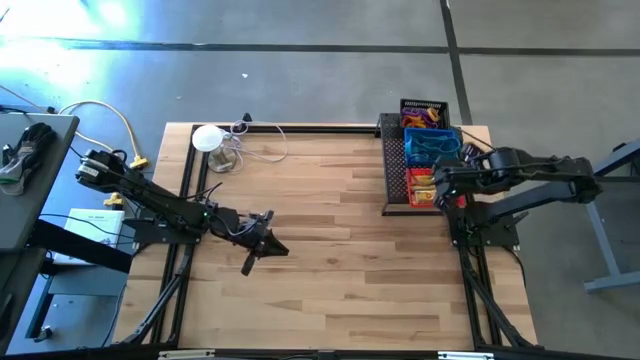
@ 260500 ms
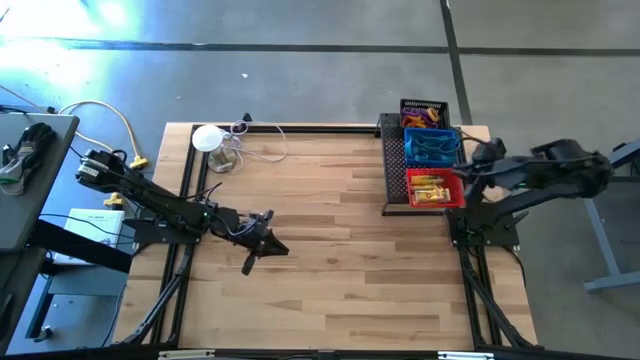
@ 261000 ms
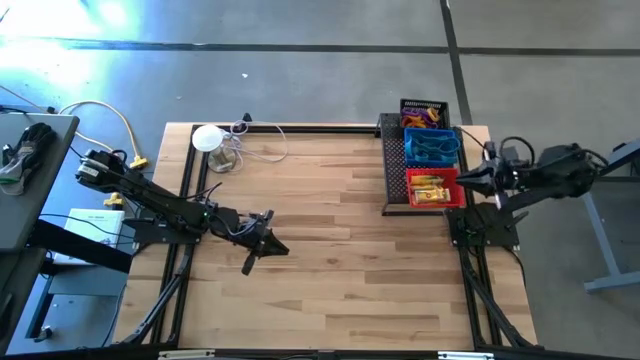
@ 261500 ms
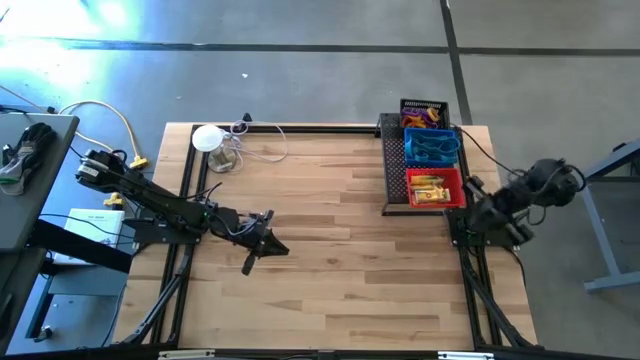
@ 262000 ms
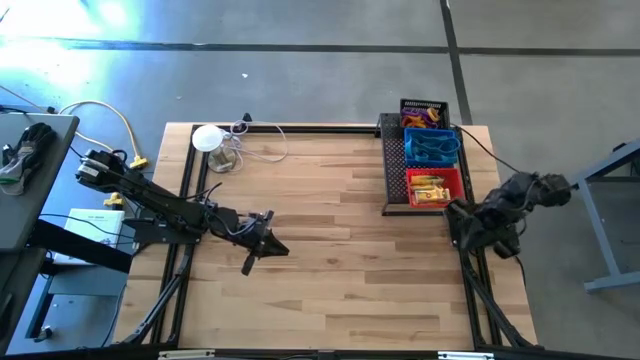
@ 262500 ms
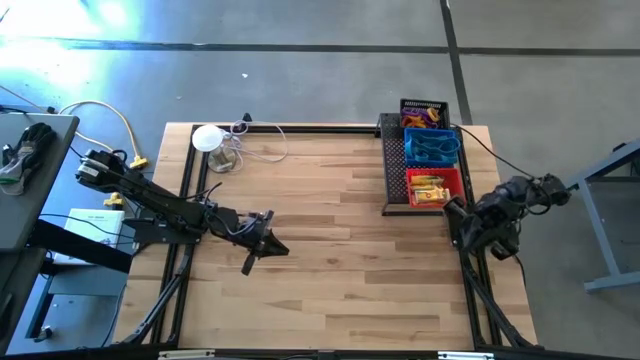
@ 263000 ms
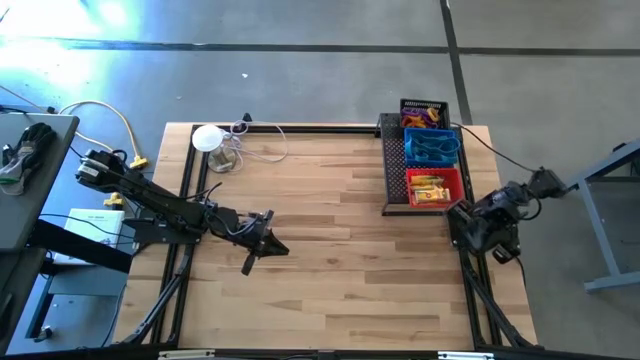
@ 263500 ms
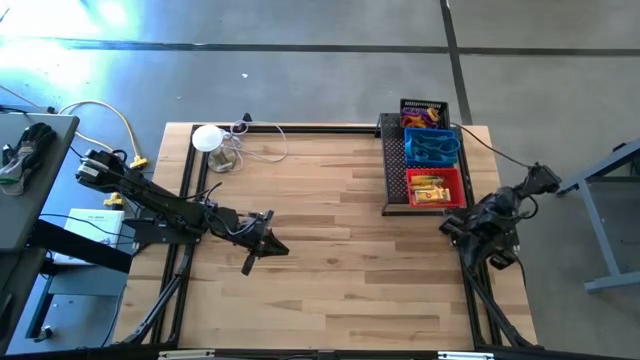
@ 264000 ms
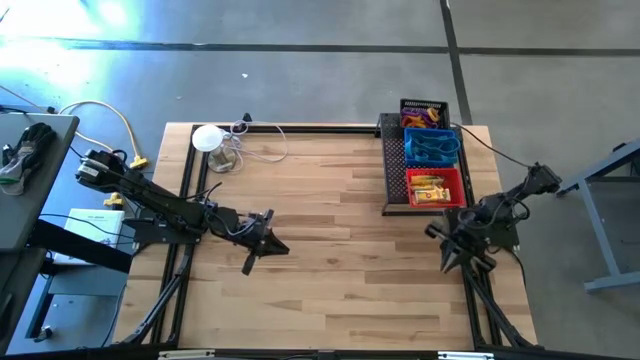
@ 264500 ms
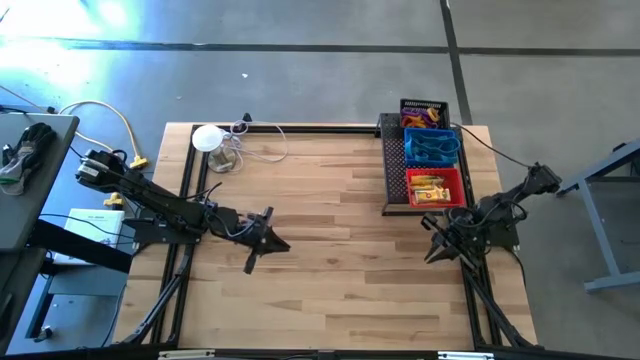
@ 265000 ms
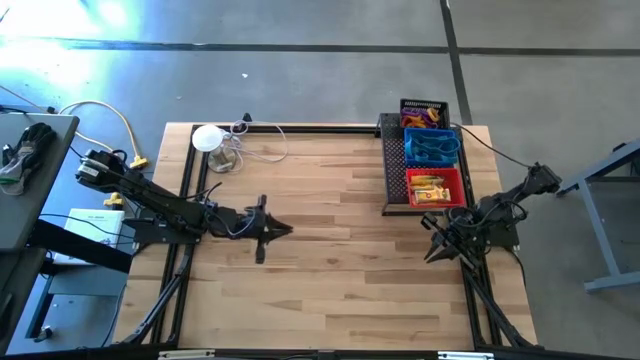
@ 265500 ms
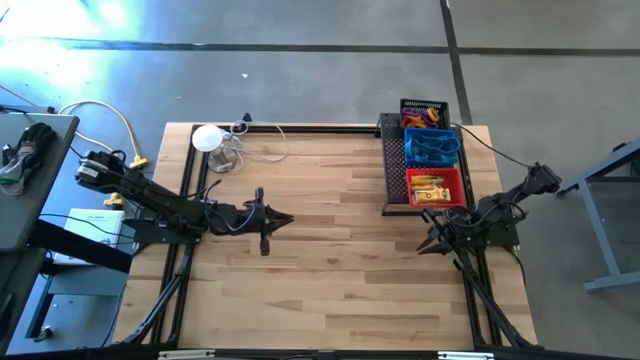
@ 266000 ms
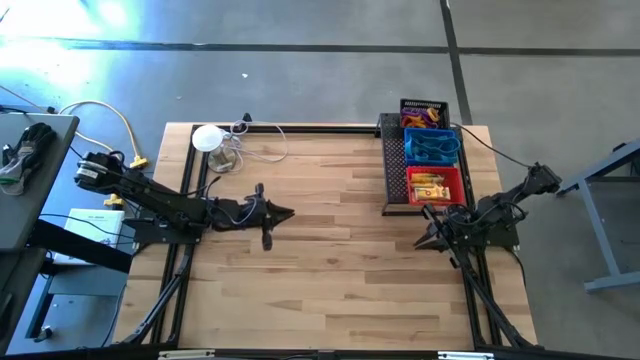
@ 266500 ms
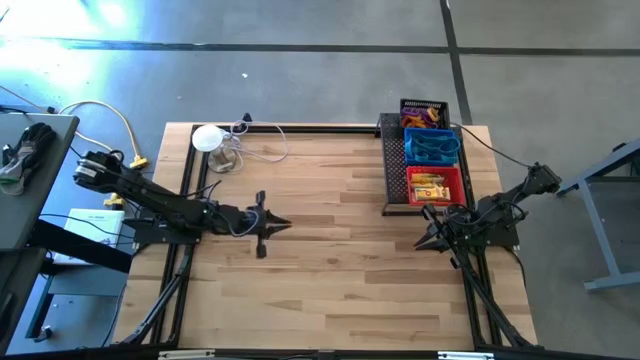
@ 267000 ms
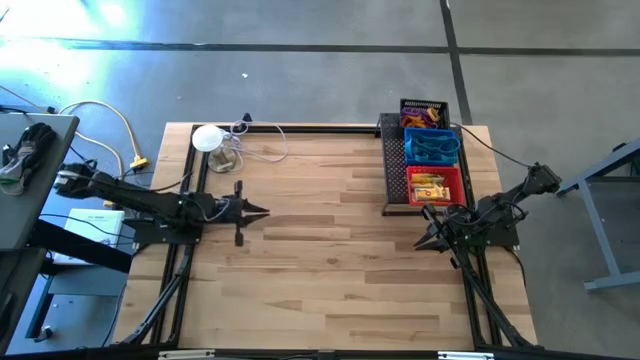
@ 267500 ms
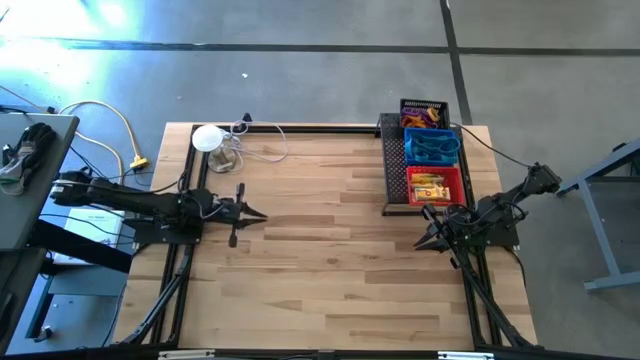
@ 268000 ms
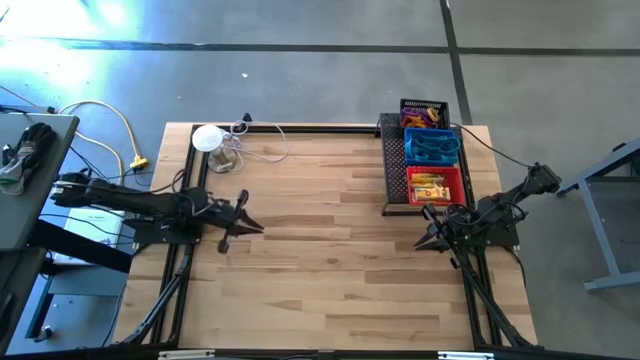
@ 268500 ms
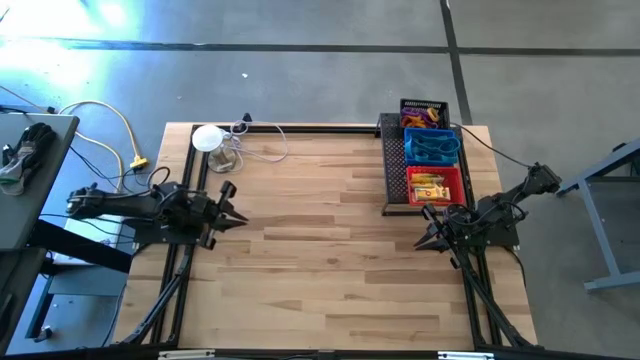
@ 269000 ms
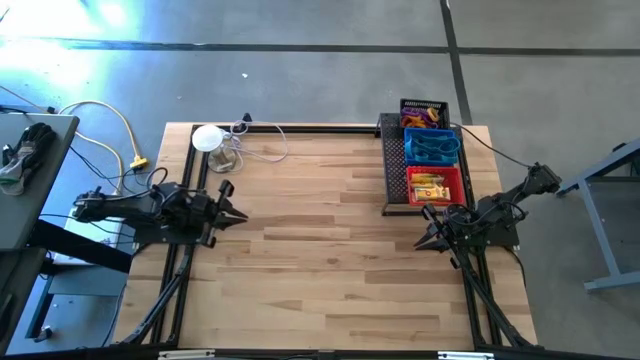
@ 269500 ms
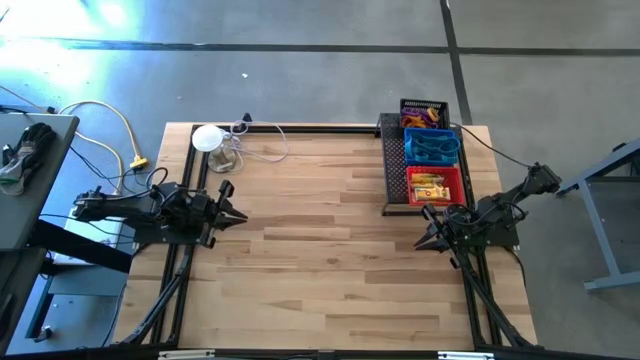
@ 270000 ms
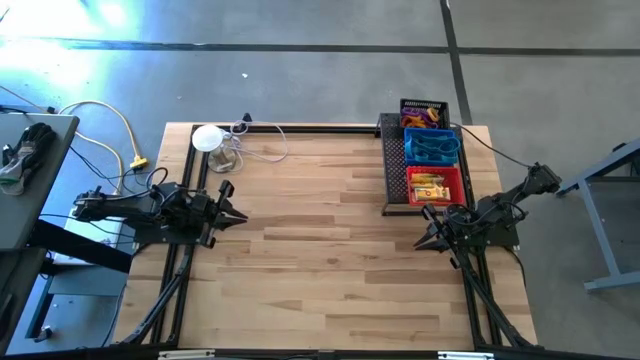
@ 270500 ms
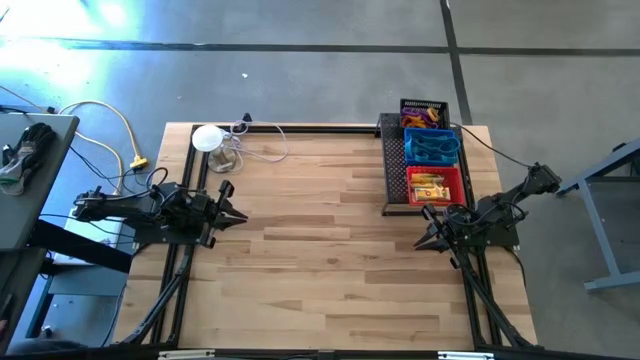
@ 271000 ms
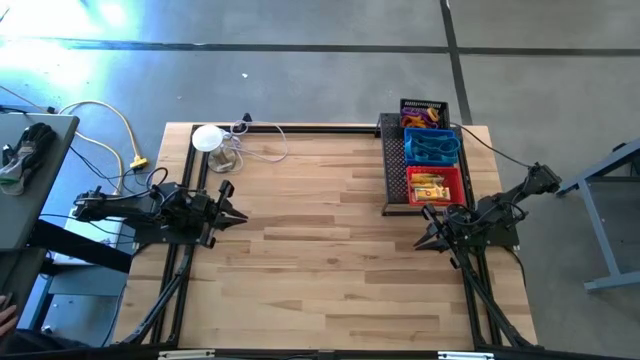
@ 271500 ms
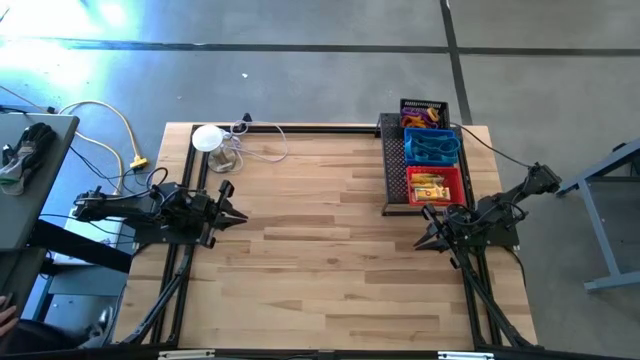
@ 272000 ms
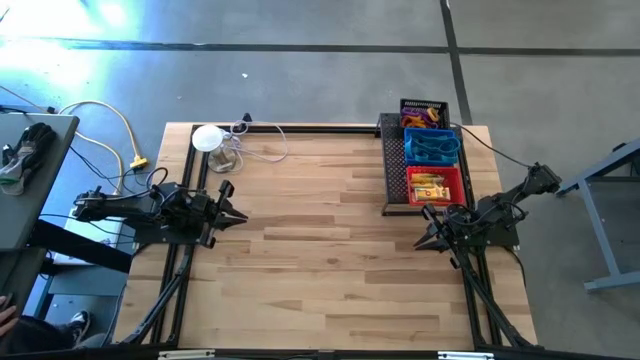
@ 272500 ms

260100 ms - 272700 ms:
Task: Pick & Place Office Desk Supplies
Return to Home Position

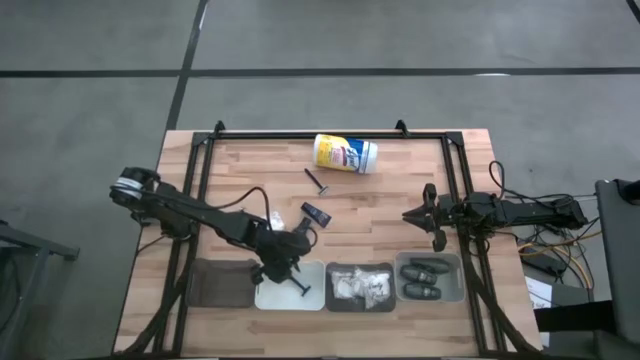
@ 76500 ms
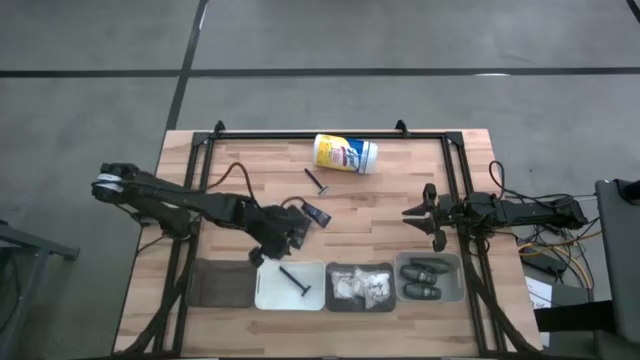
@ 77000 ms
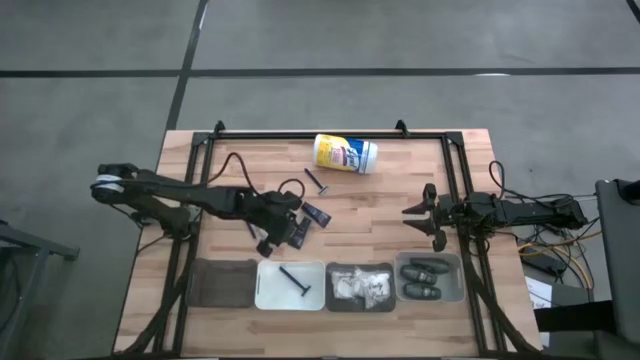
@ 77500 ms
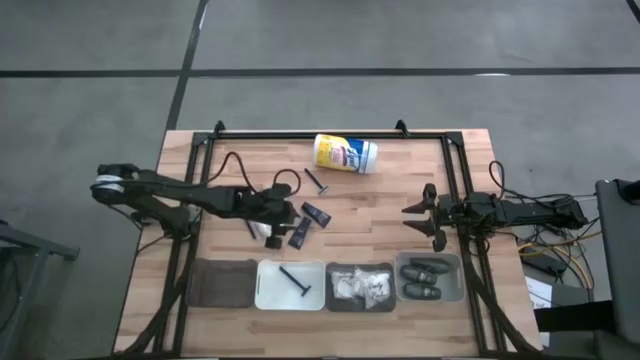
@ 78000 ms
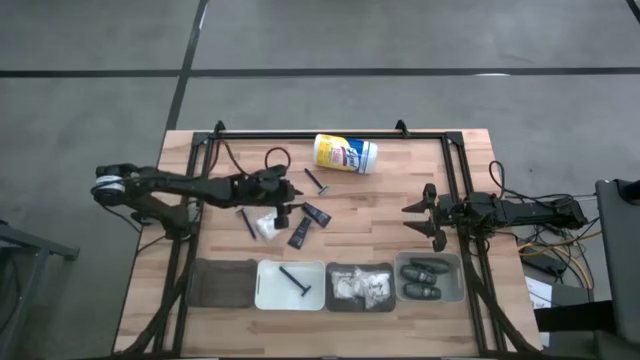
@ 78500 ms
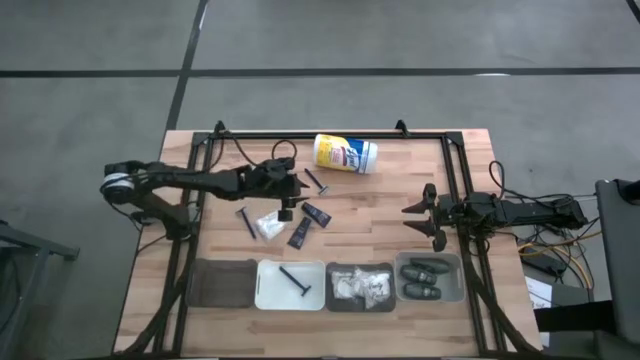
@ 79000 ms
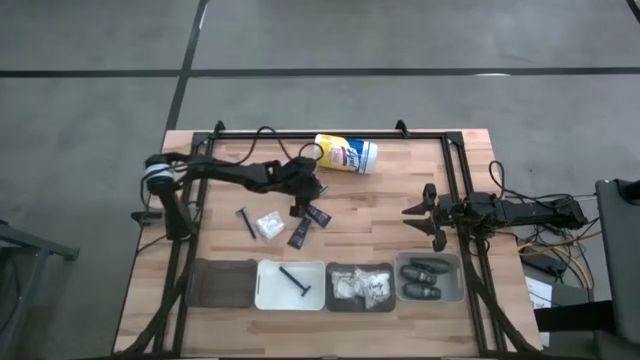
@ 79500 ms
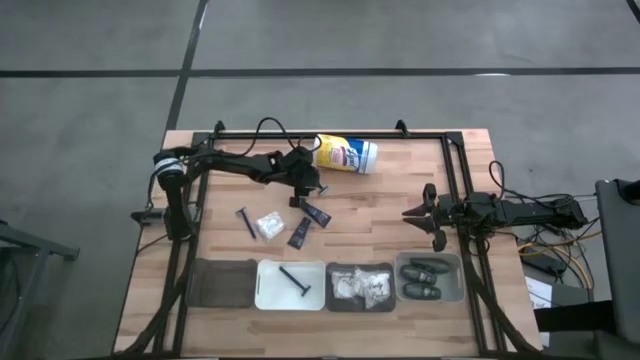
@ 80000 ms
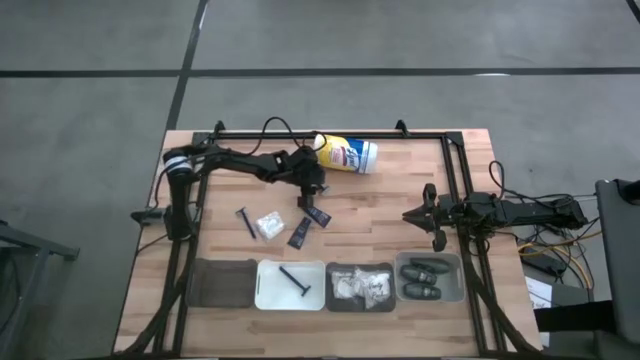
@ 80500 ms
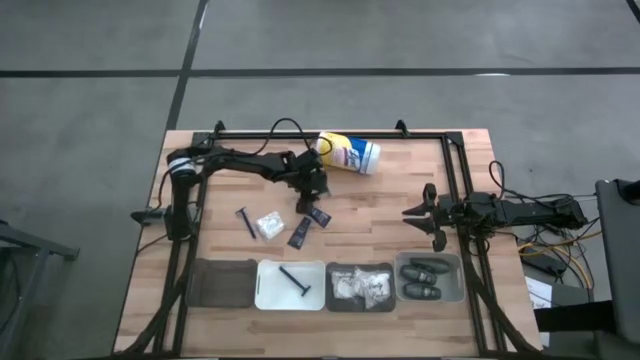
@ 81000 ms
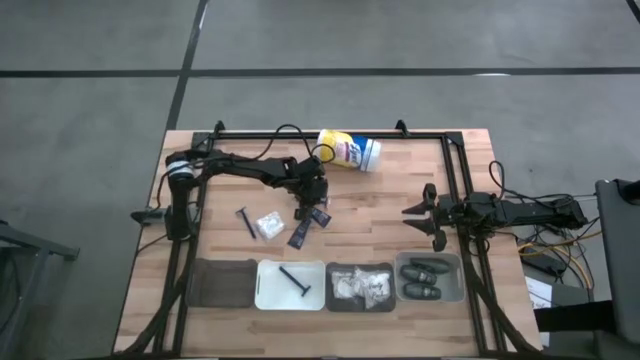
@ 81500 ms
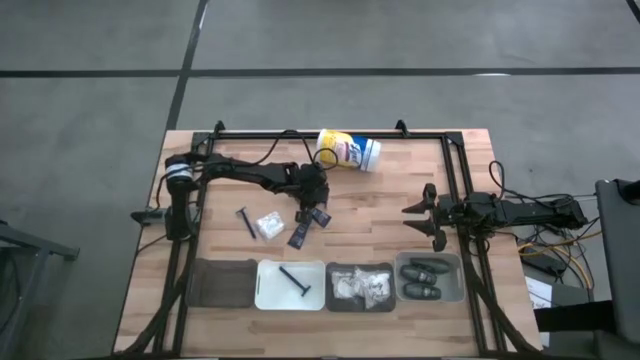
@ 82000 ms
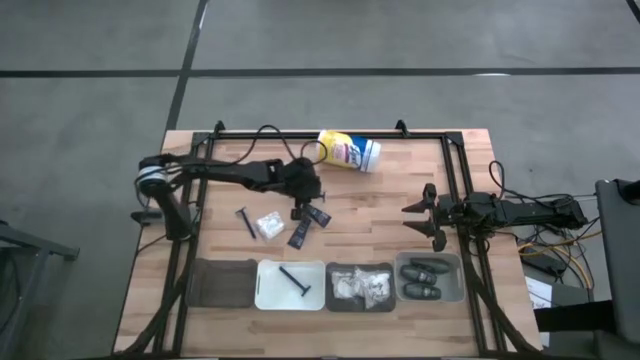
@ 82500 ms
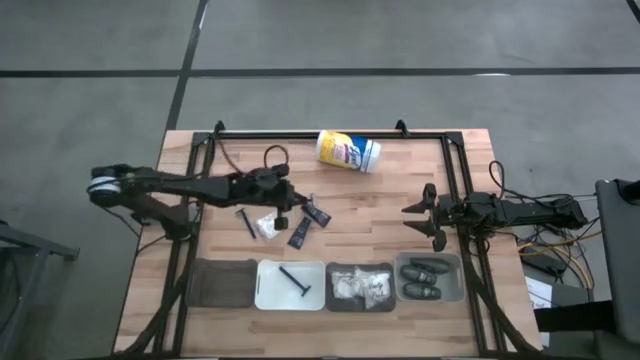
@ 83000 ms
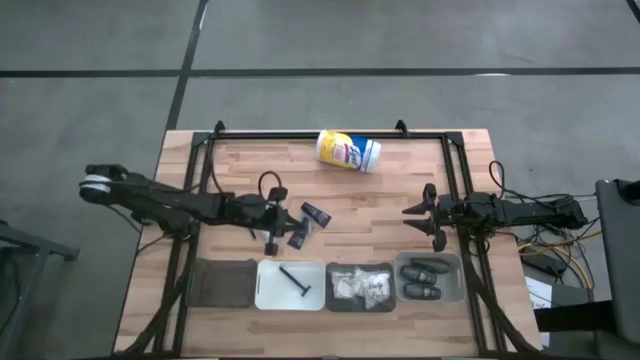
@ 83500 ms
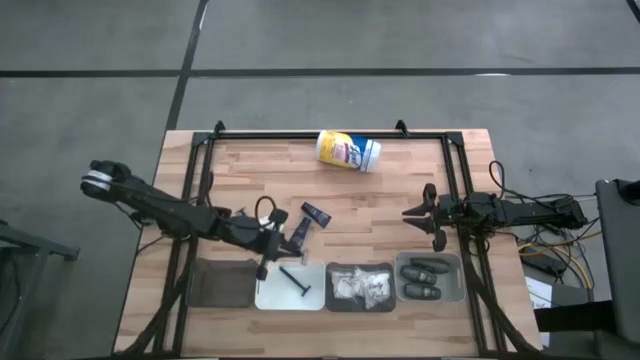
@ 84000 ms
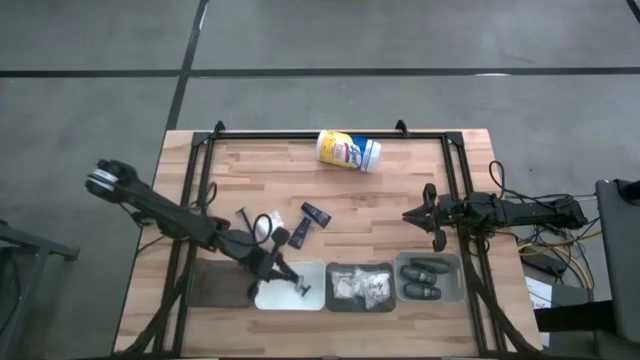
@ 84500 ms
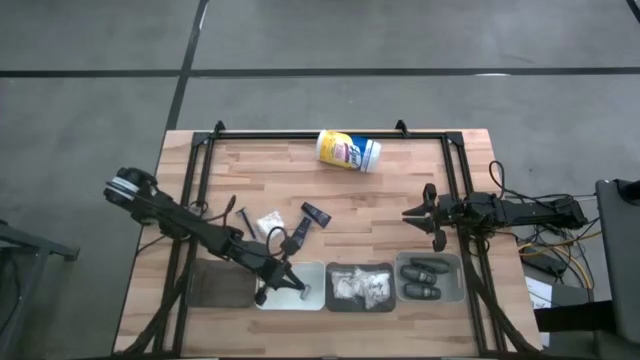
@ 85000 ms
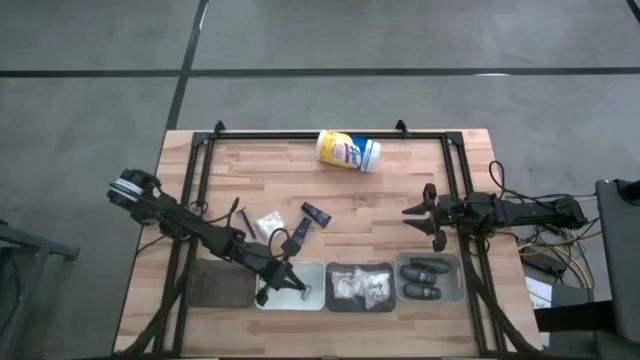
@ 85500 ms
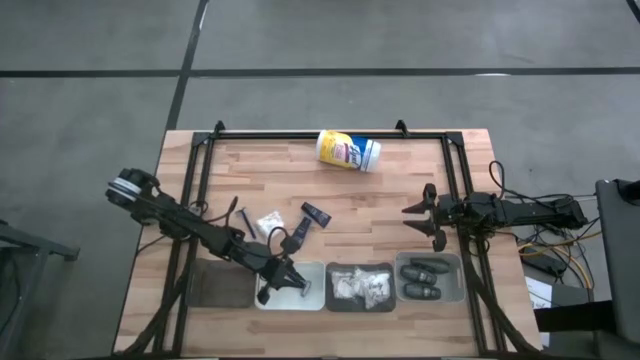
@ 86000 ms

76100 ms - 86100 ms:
Task: Pick & Place Travel size toiletries
Put the blue razor into the white bin
